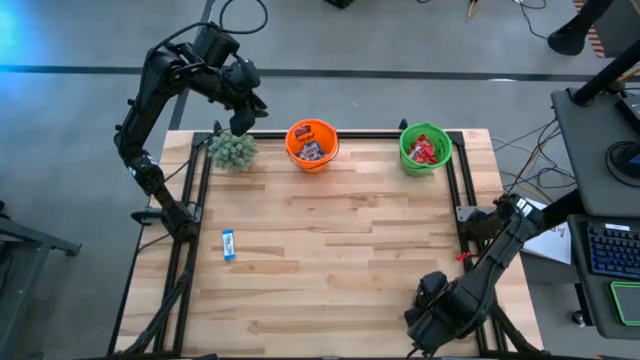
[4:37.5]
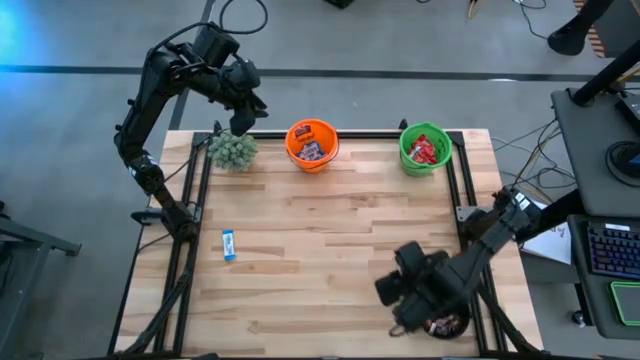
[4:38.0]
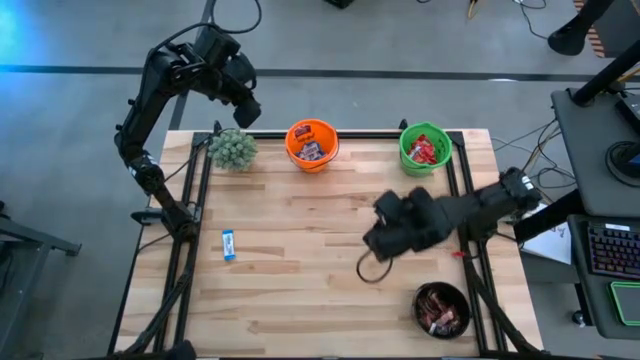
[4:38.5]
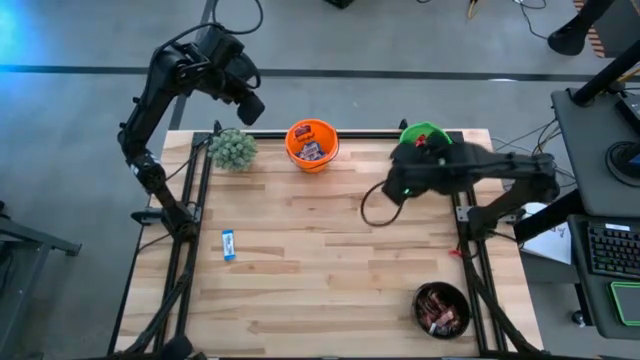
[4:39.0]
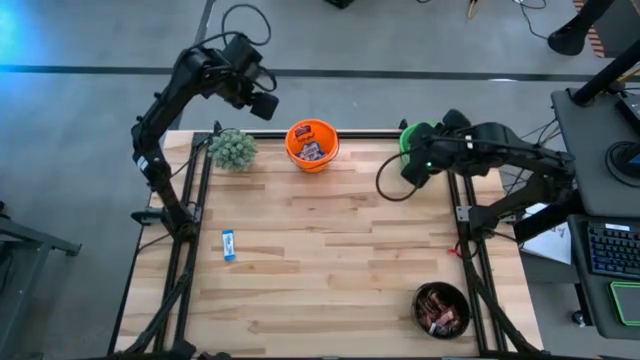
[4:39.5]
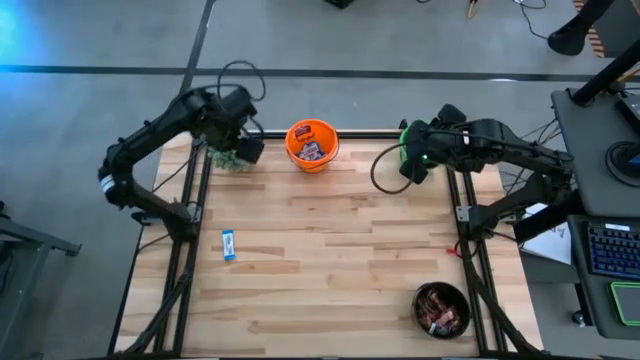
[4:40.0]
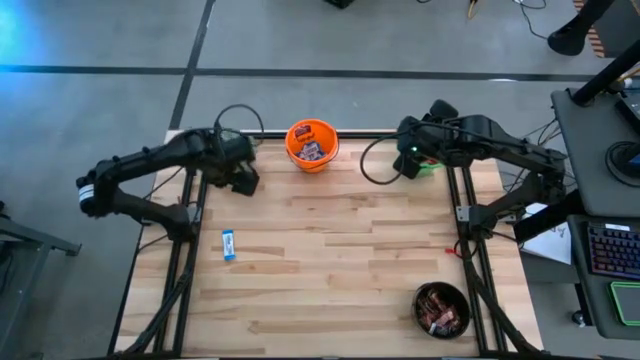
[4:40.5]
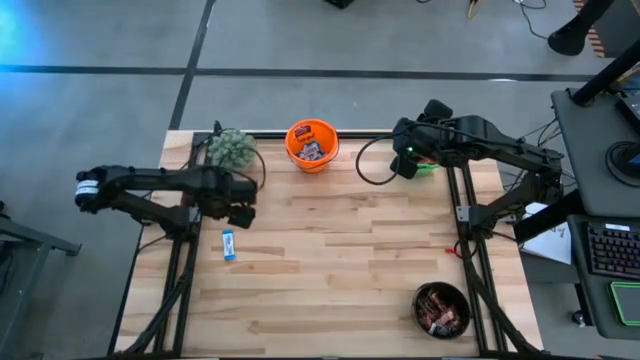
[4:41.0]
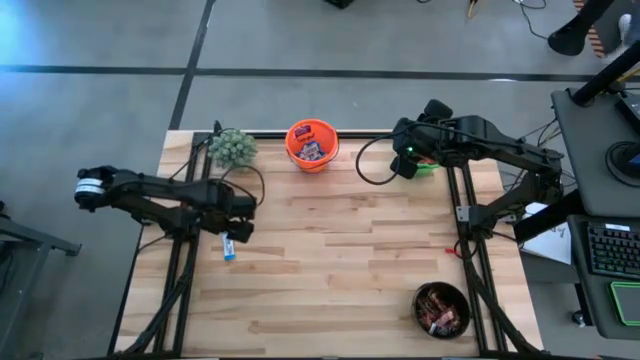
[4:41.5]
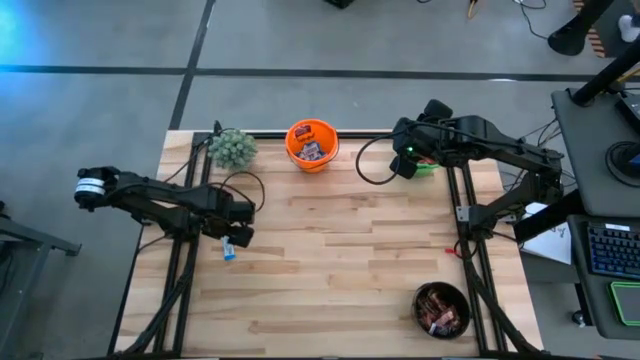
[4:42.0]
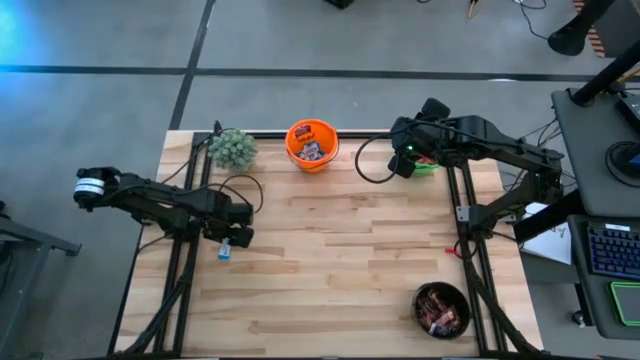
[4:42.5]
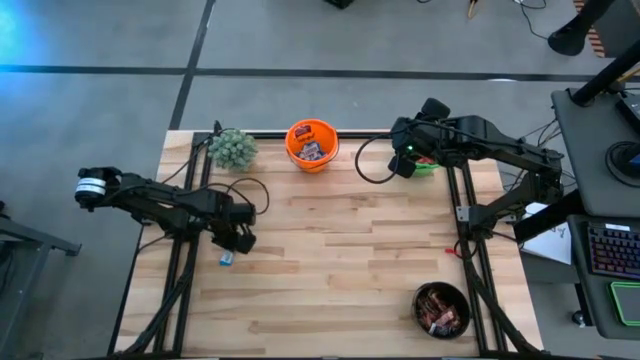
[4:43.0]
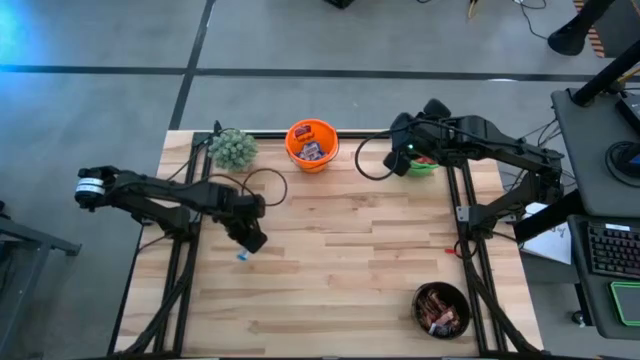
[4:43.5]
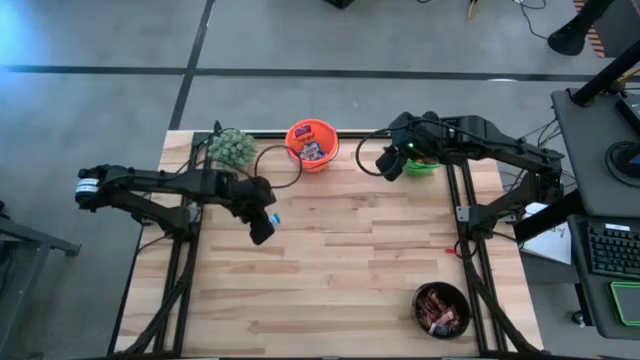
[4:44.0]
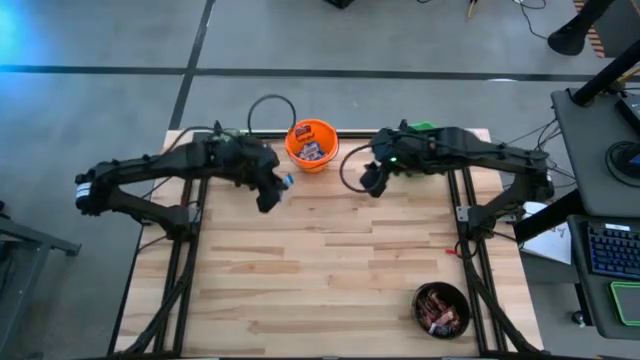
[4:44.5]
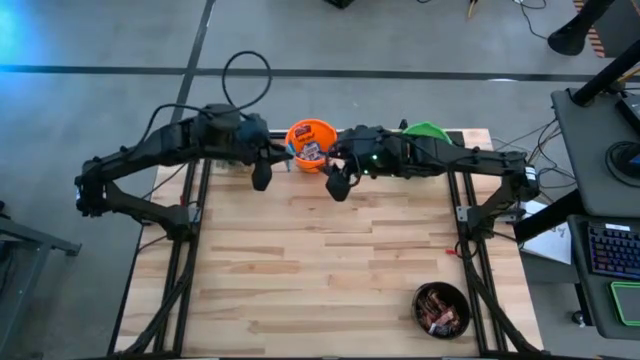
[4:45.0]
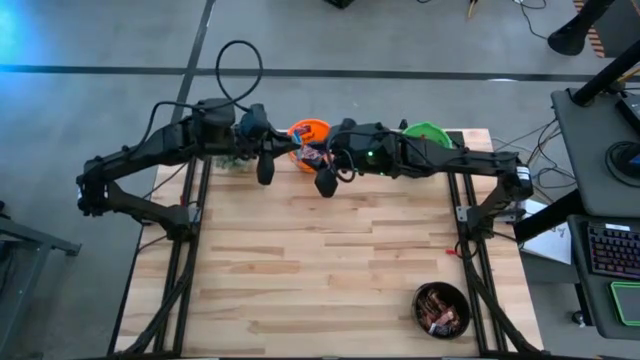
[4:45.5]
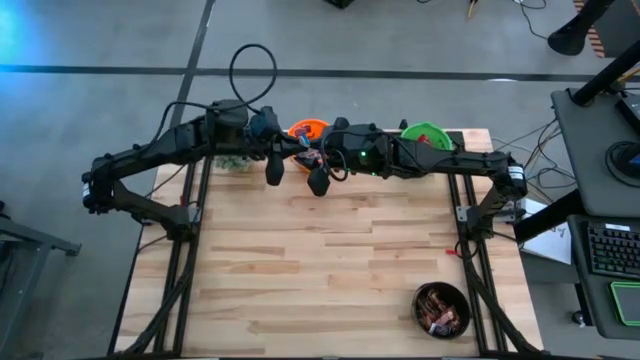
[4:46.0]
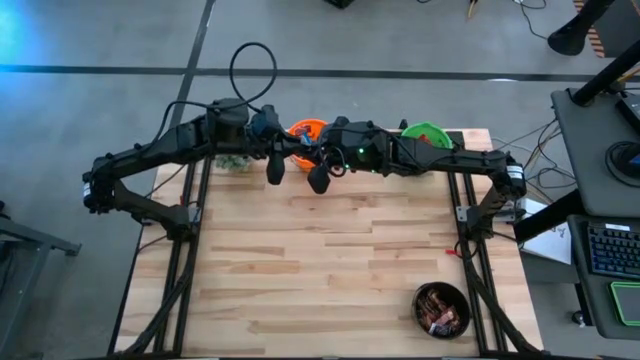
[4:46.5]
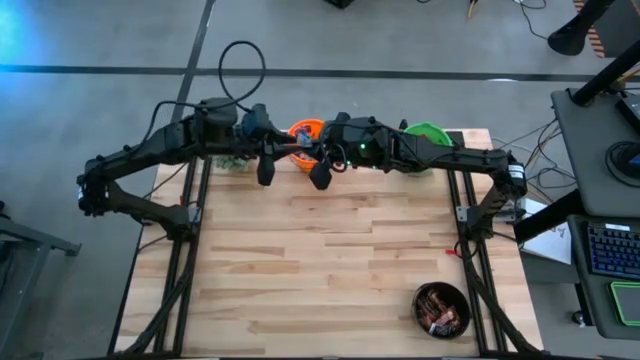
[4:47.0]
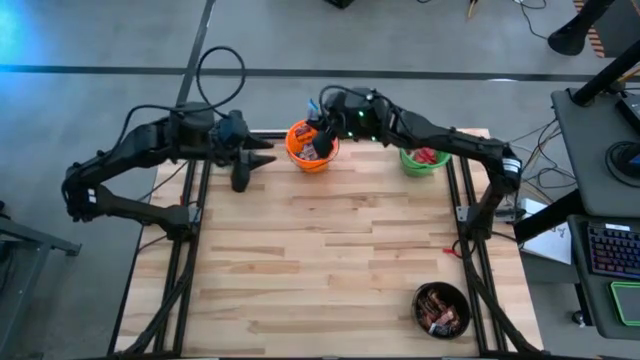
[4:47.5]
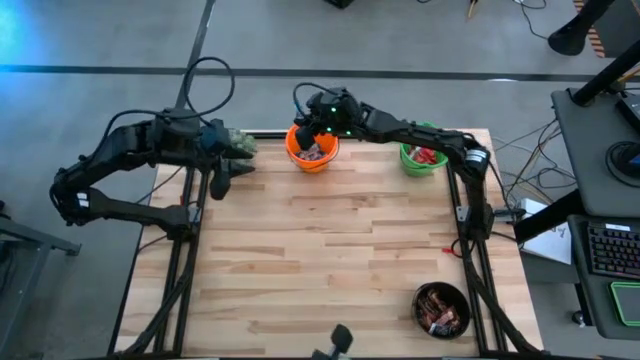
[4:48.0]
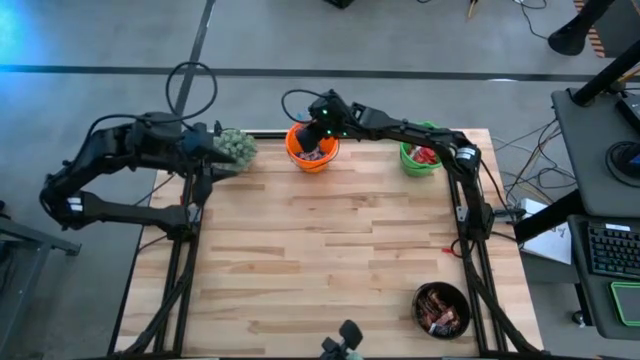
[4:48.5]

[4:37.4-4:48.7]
Task: Sort candy
Put the white chocolate into the orange bucket

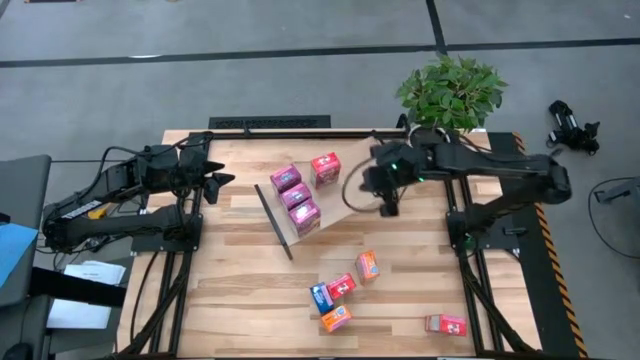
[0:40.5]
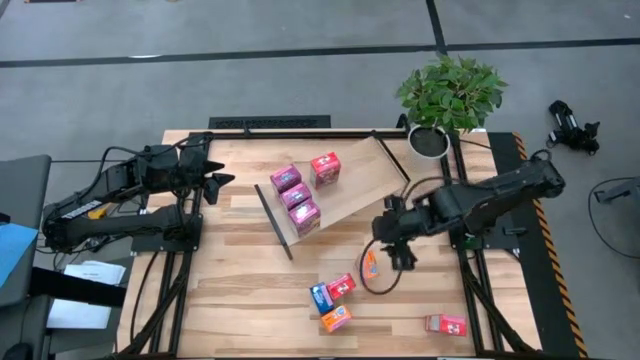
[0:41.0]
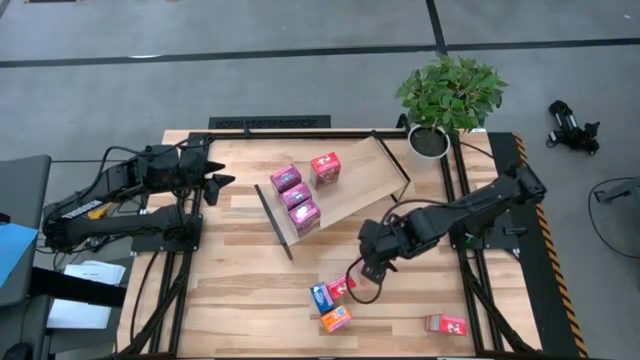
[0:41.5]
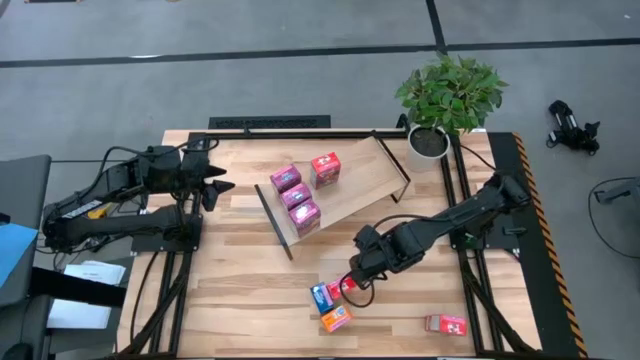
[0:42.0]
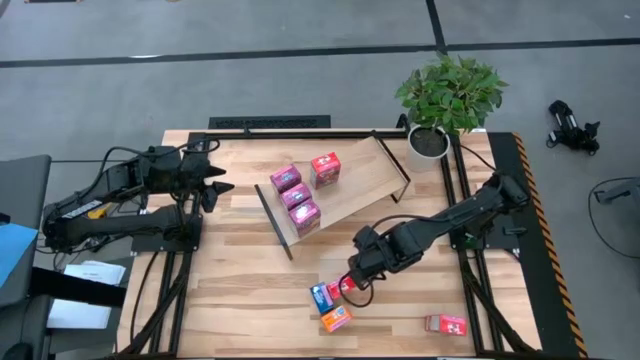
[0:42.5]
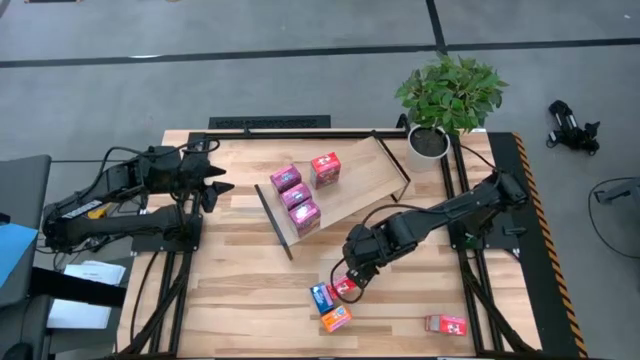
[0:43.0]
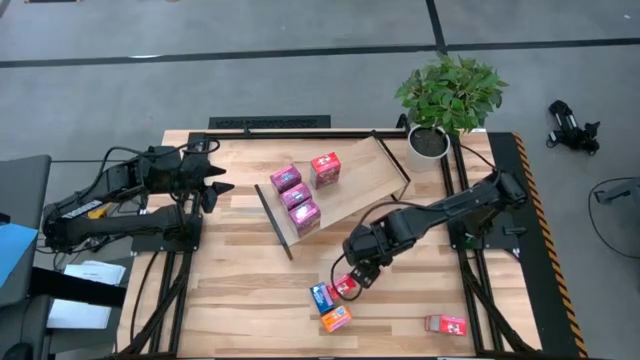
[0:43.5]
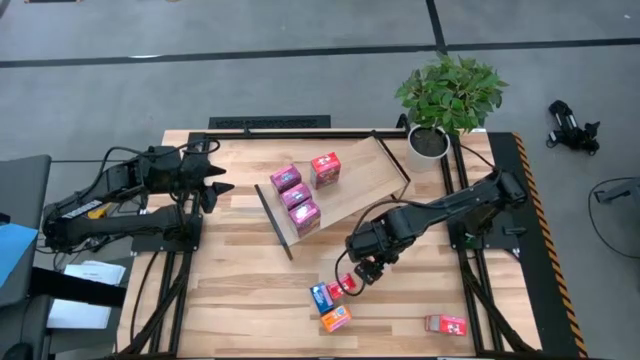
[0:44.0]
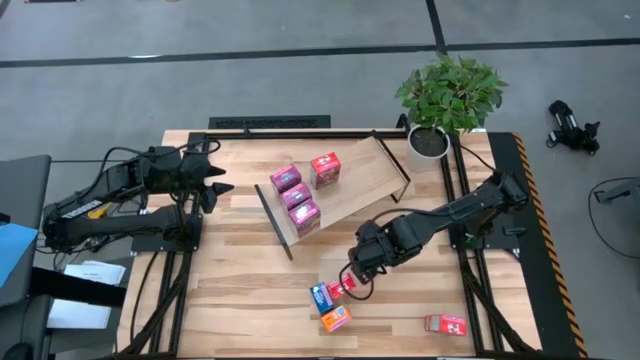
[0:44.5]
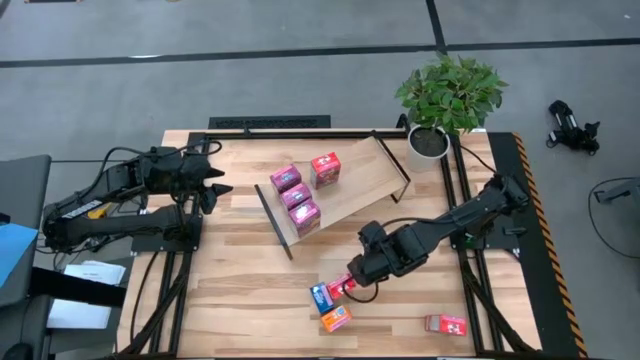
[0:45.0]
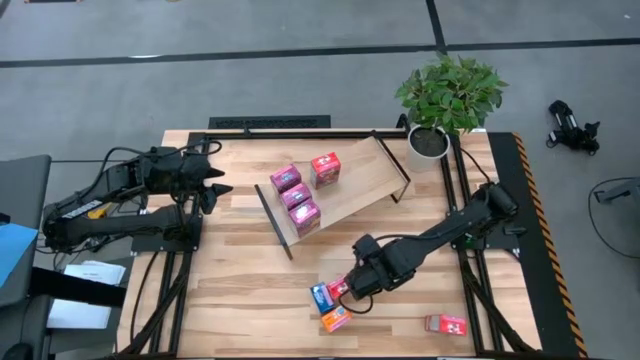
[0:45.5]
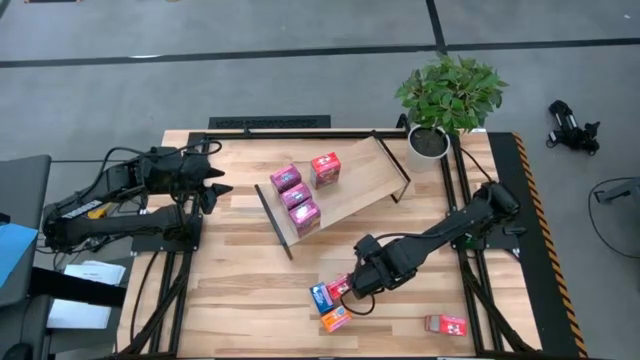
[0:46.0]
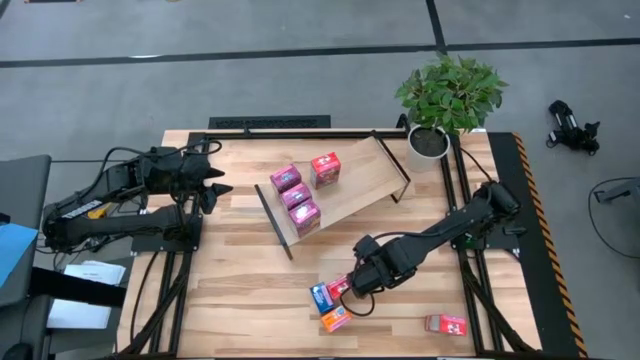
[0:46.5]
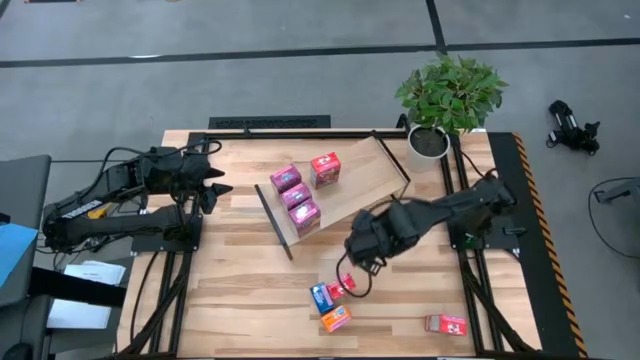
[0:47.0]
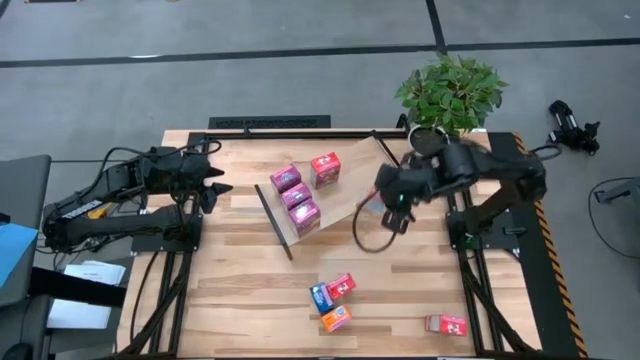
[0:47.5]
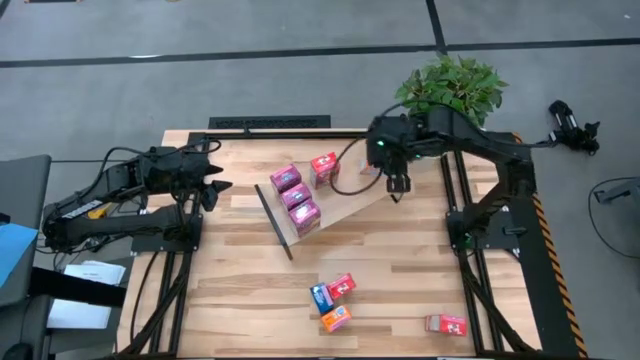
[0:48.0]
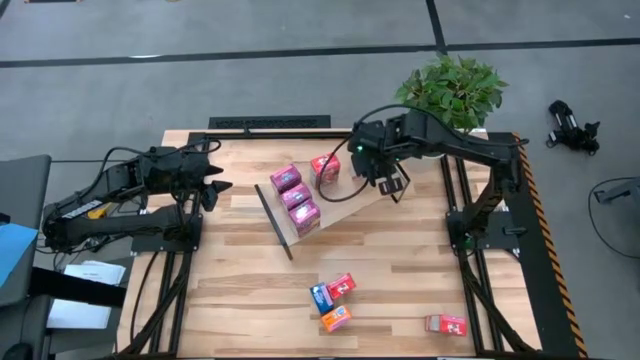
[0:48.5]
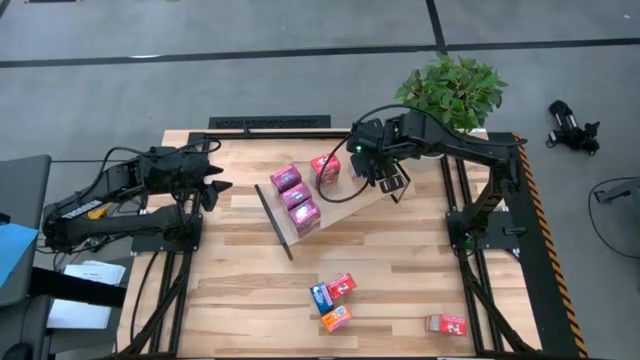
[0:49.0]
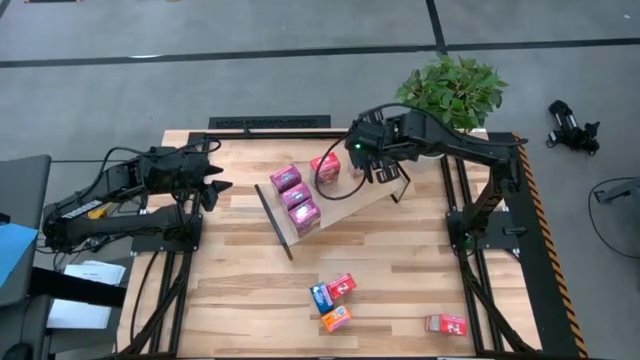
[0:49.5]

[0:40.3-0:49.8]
Task: Stack cereal on shelf
Put the top orange cereal box on the shelf
